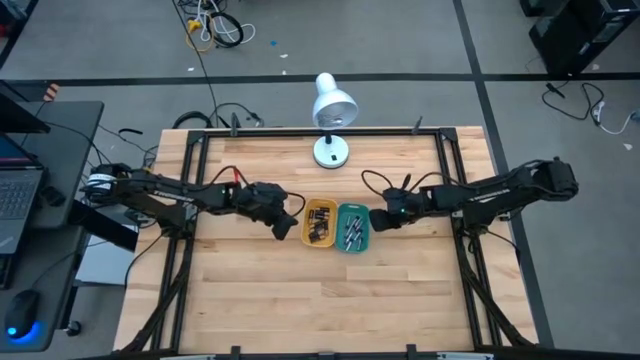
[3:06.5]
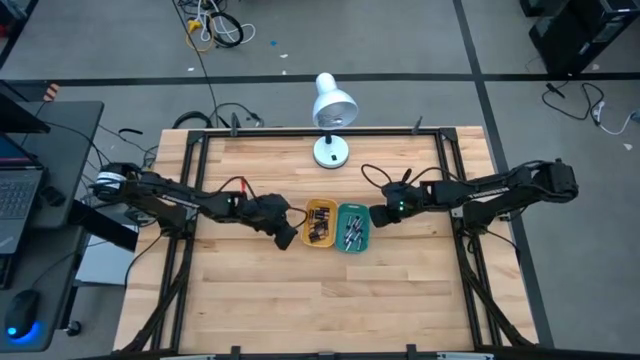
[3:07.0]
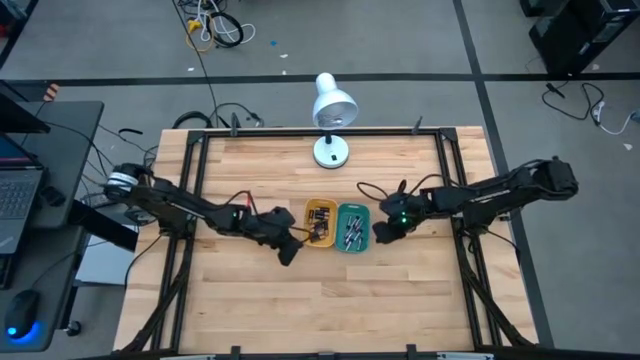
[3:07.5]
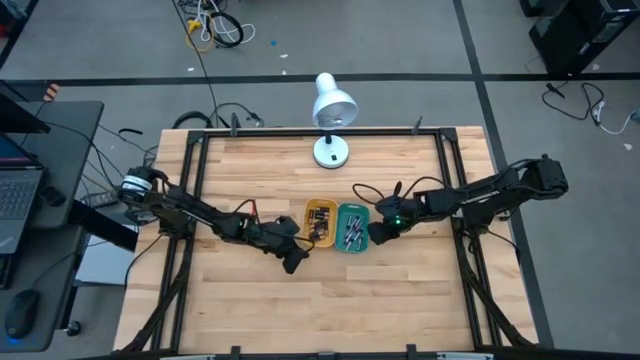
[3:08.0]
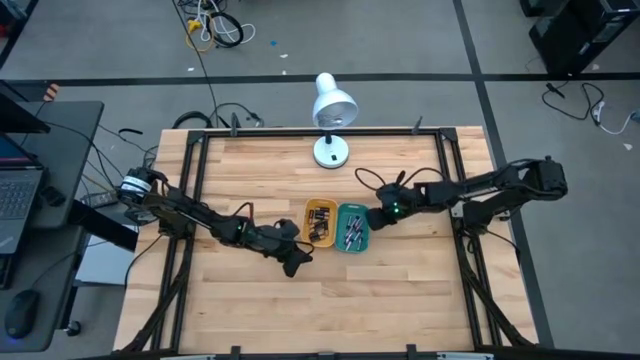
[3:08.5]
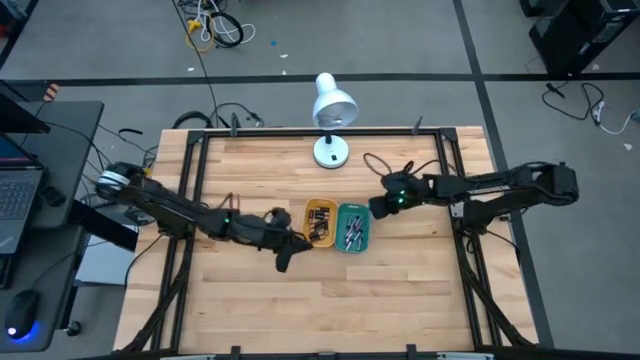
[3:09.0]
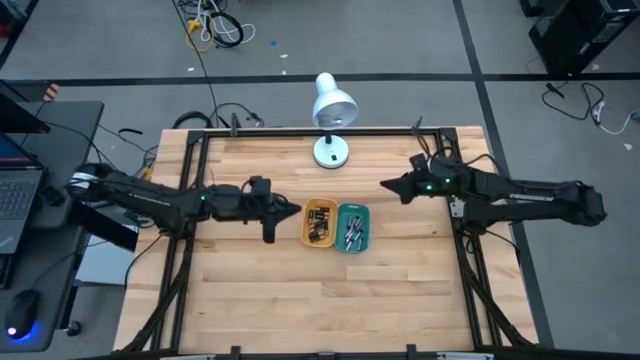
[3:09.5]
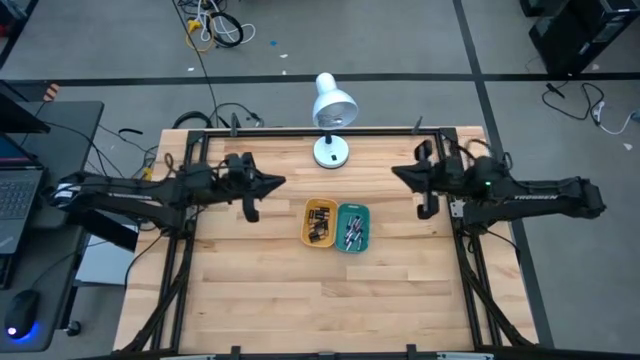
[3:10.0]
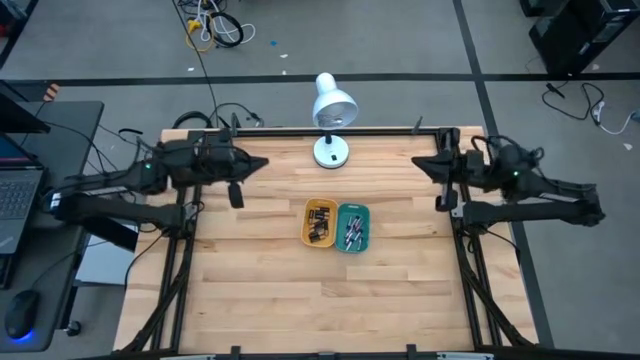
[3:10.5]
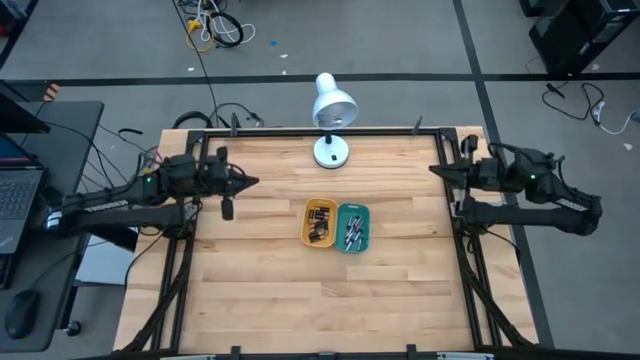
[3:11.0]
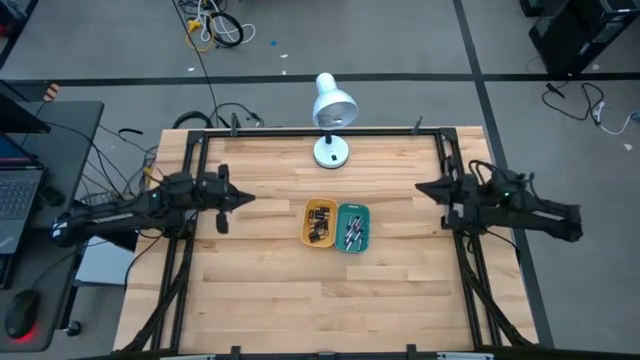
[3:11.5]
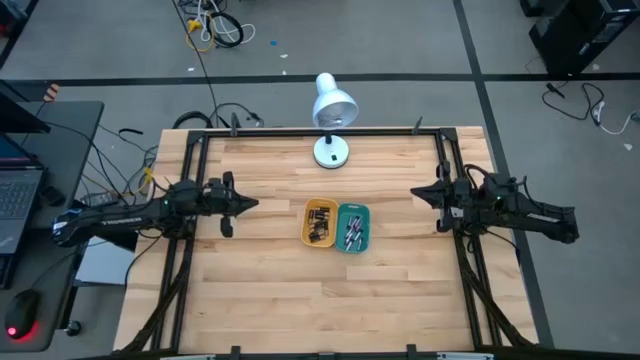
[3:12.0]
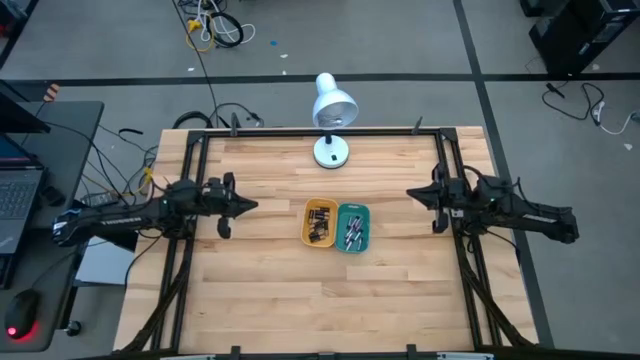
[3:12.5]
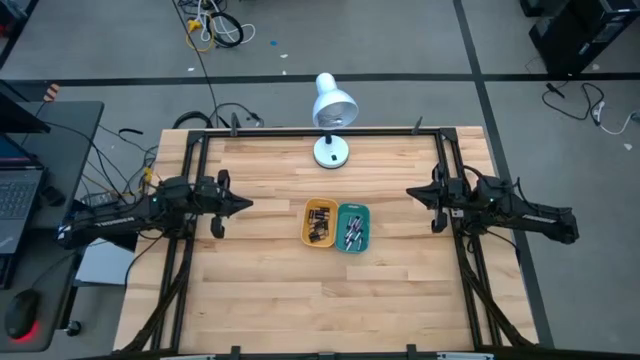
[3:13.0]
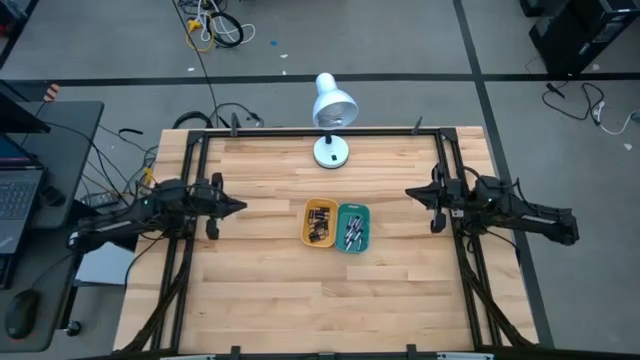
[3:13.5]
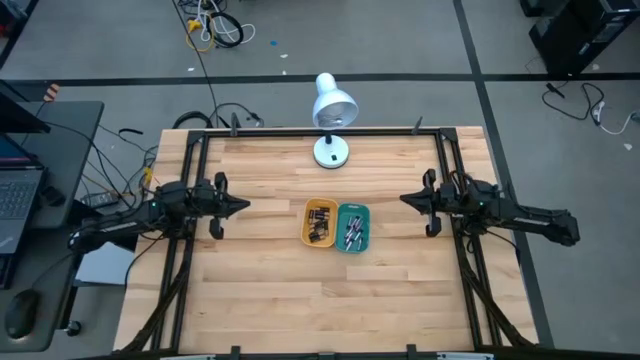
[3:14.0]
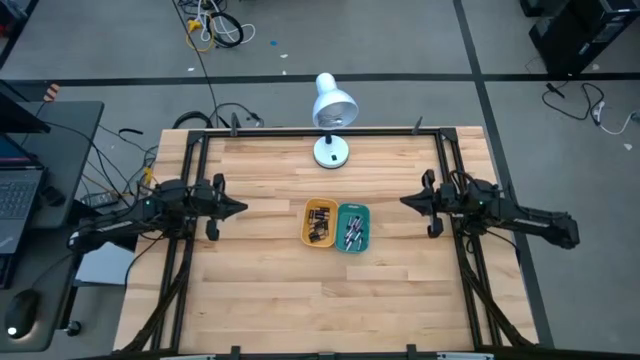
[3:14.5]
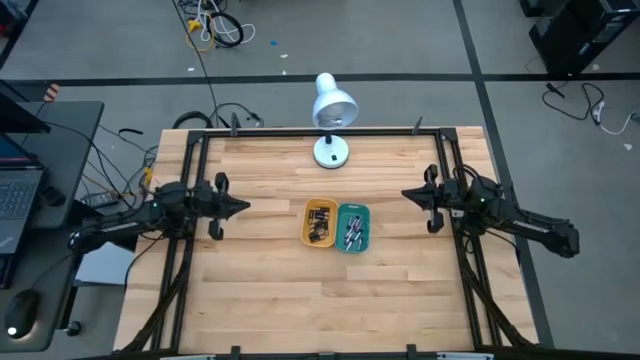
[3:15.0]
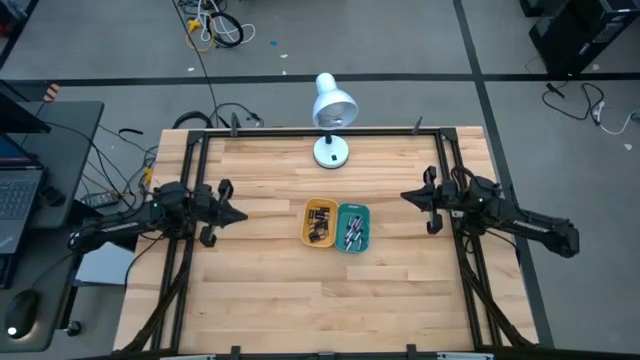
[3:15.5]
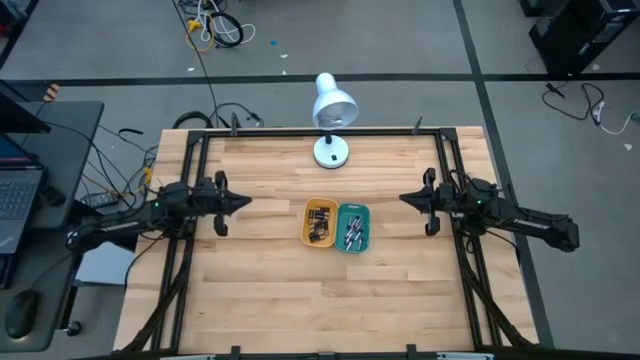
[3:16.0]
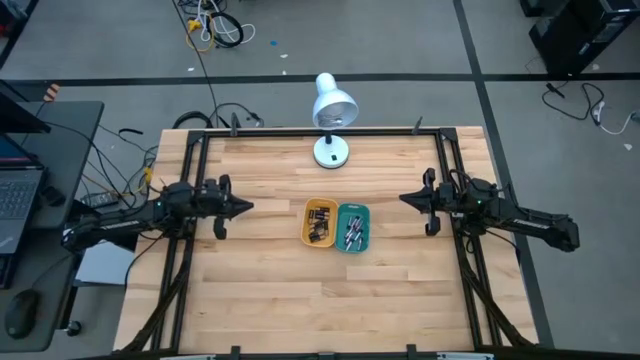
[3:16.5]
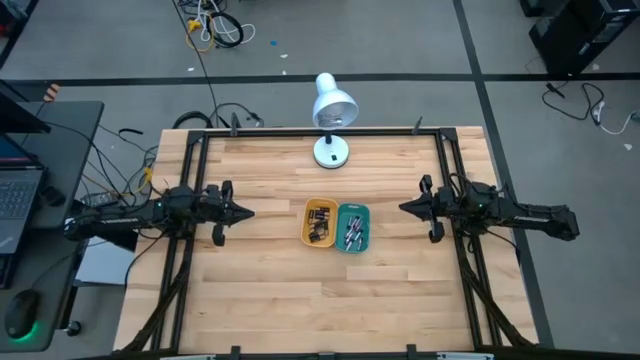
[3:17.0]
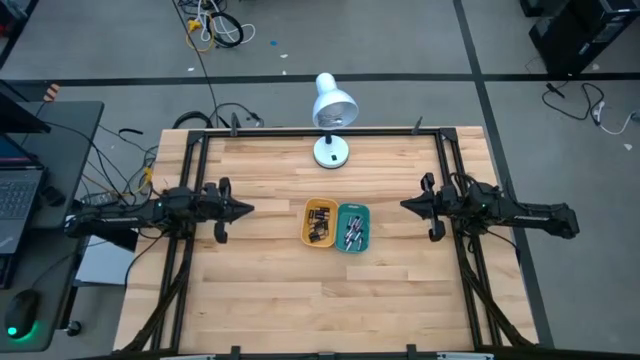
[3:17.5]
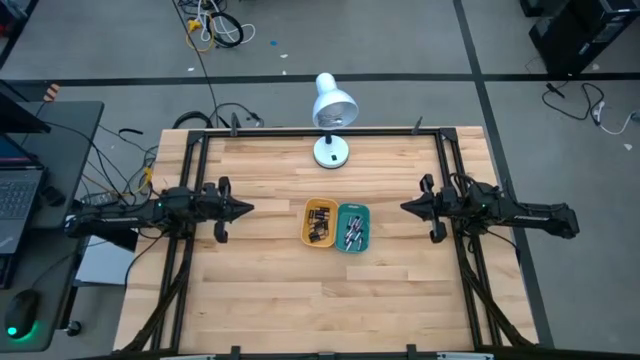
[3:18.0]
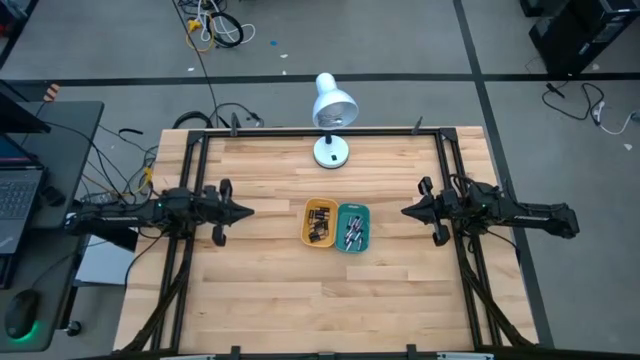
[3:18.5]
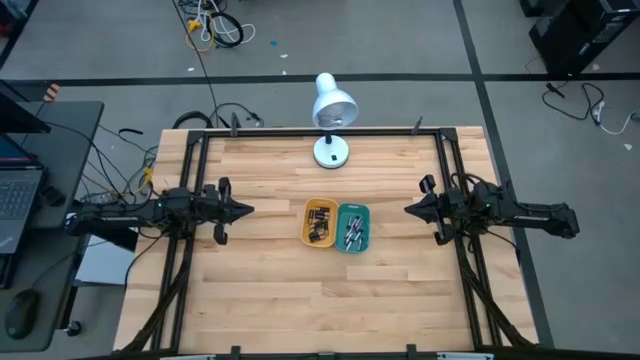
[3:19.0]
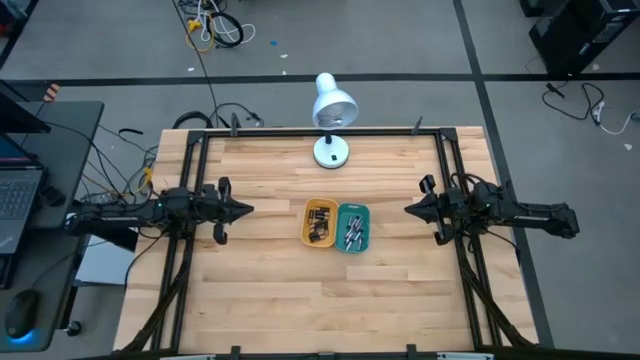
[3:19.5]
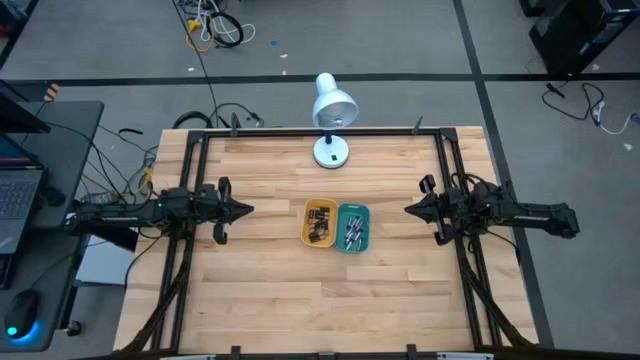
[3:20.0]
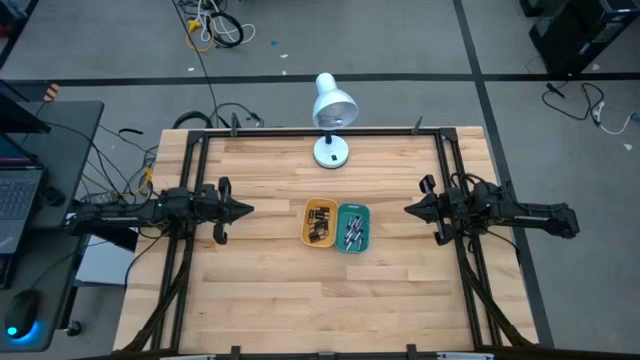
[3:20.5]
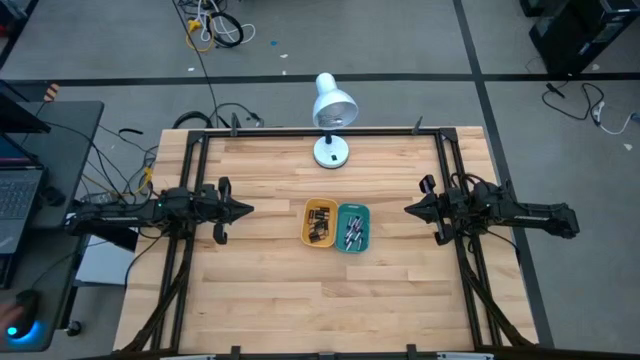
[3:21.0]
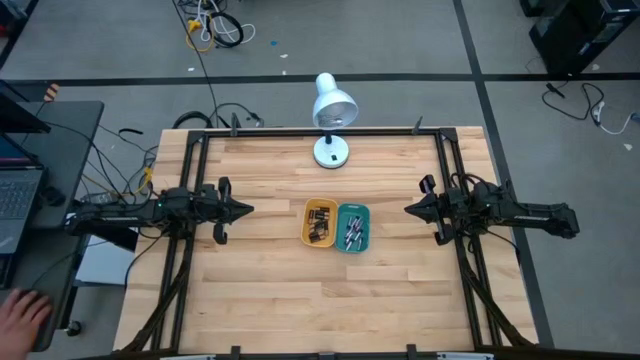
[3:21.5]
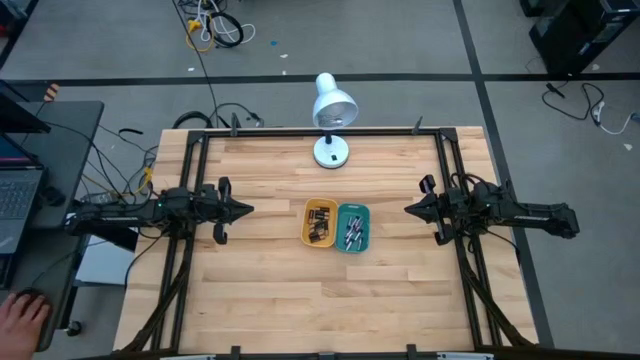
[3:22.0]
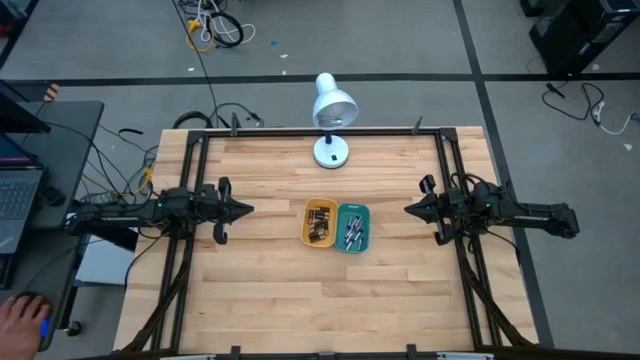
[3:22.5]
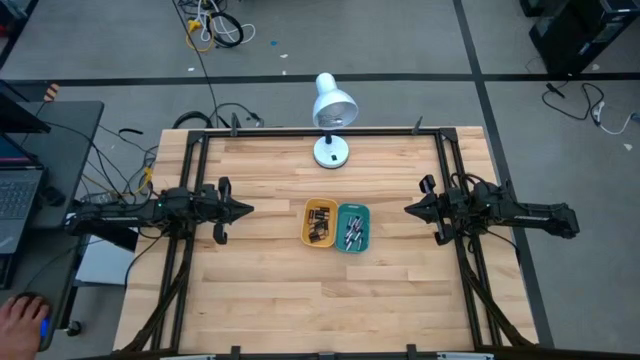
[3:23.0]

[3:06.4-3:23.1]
Task: Sort batteries
Return to Home Position

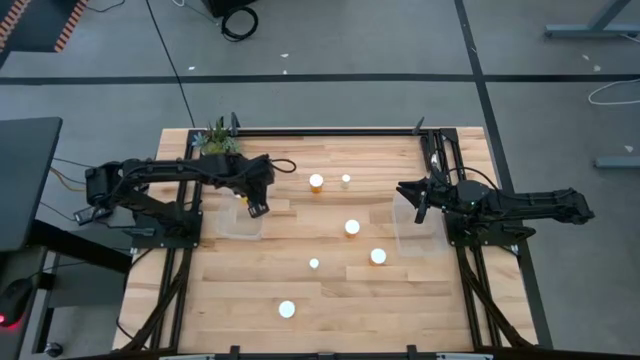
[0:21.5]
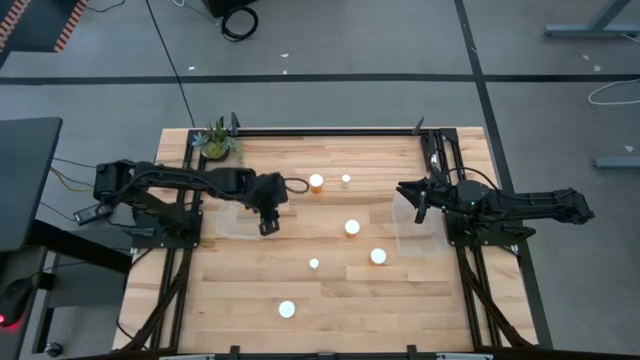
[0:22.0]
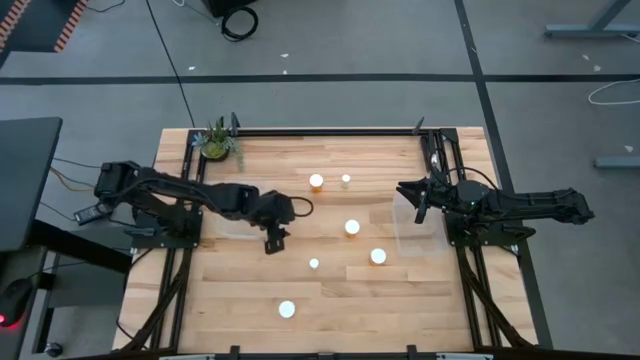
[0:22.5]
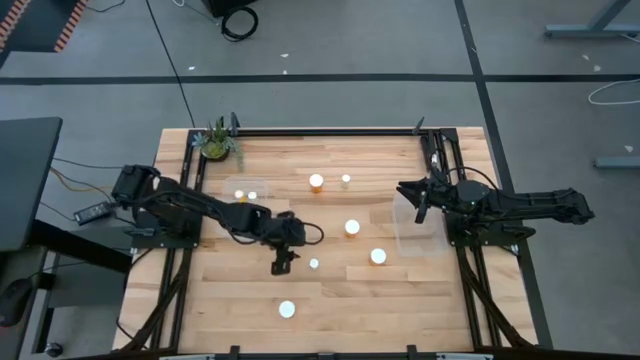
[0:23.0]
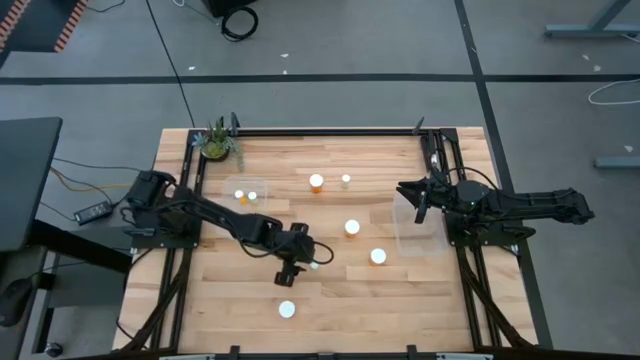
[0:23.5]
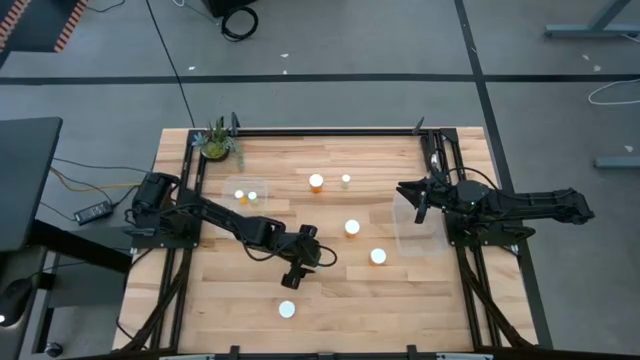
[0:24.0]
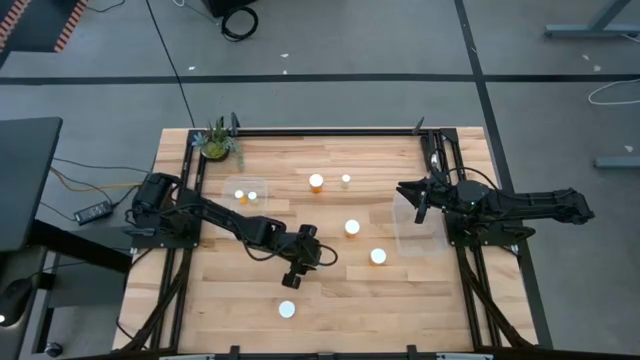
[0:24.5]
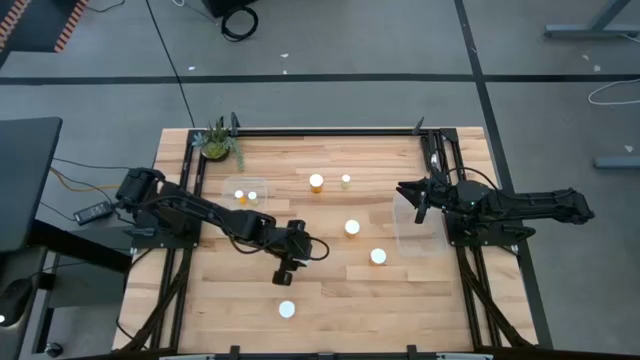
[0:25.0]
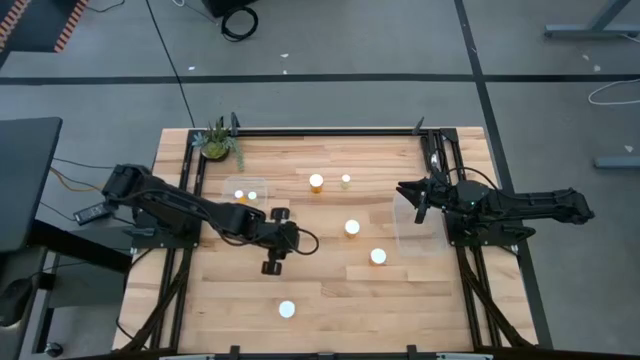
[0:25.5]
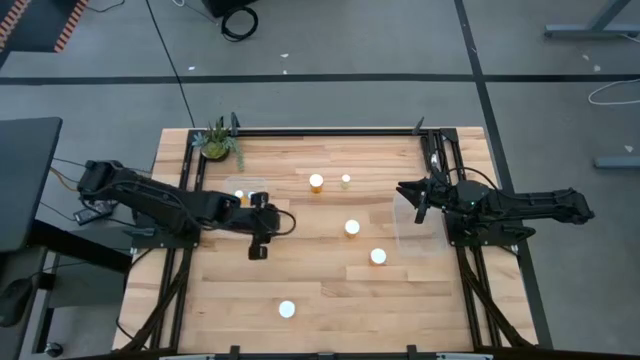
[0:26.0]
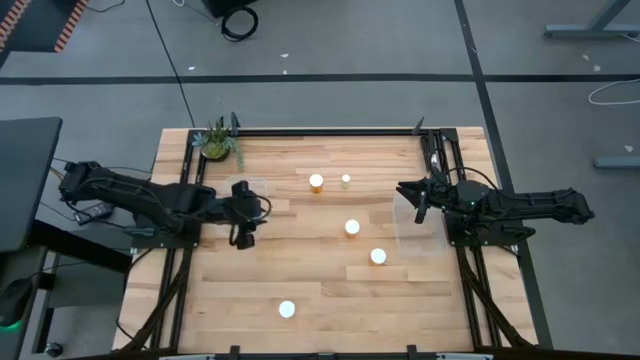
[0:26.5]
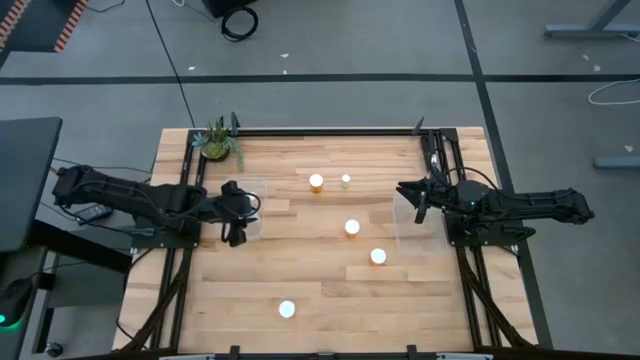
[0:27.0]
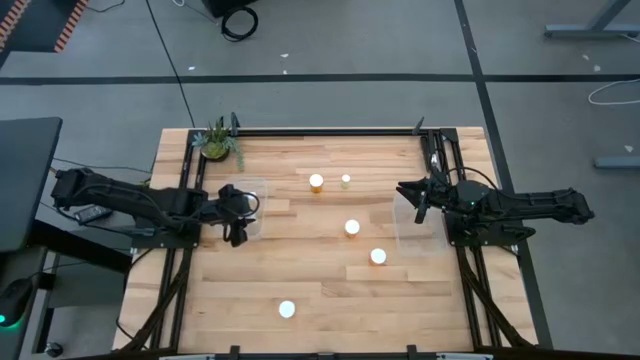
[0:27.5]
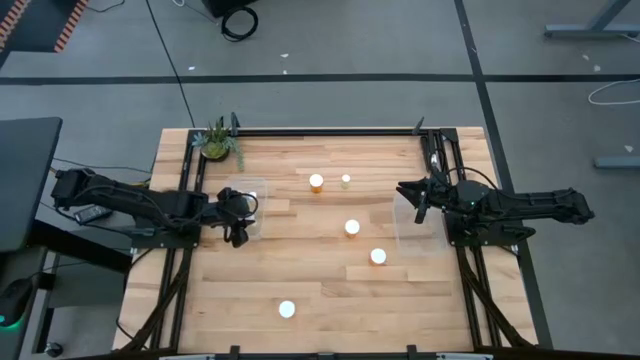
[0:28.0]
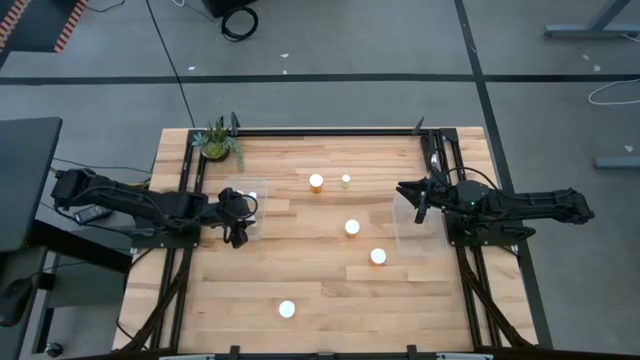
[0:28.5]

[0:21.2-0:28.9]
Task: Pick and place medicine bottles into bin by pill shape (circle, oval)
Put the yellow pill bottle into the left transparent bin
